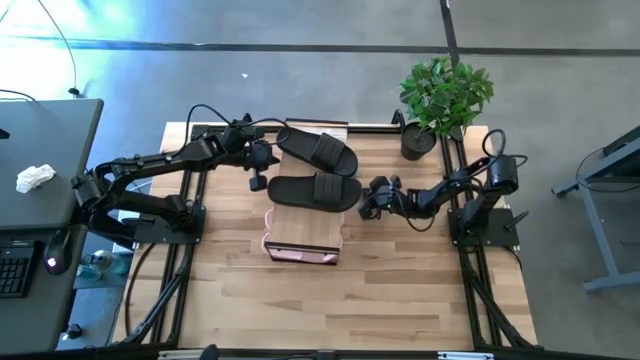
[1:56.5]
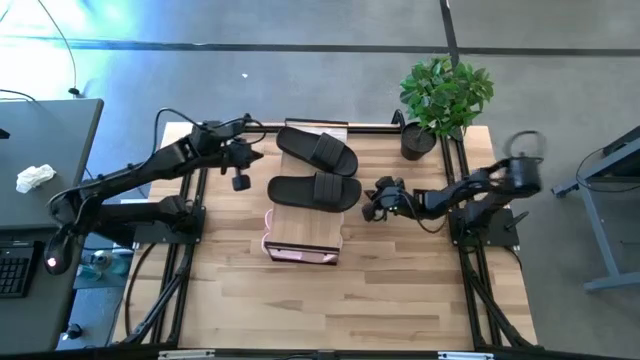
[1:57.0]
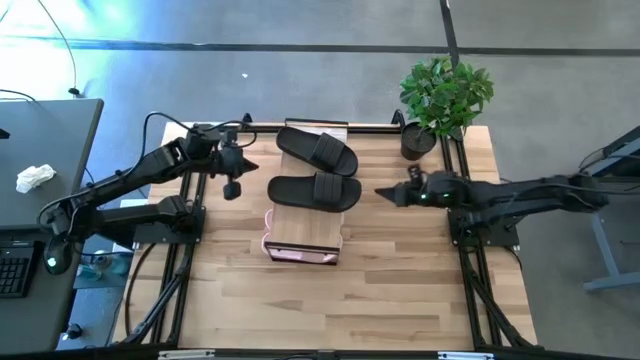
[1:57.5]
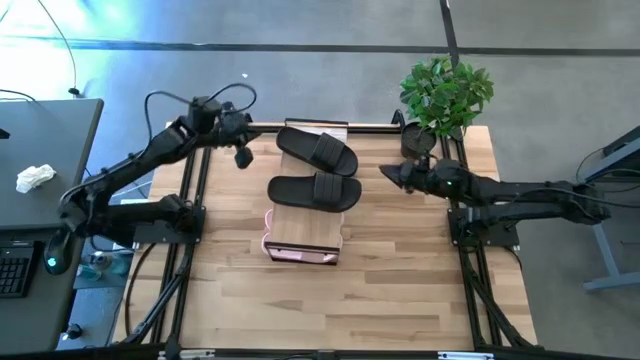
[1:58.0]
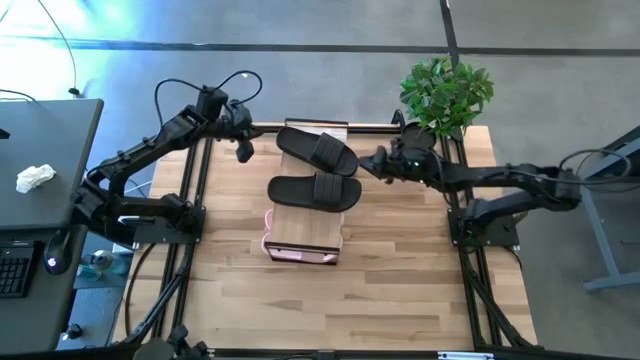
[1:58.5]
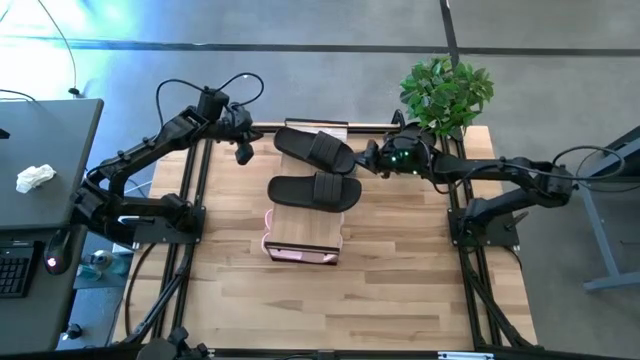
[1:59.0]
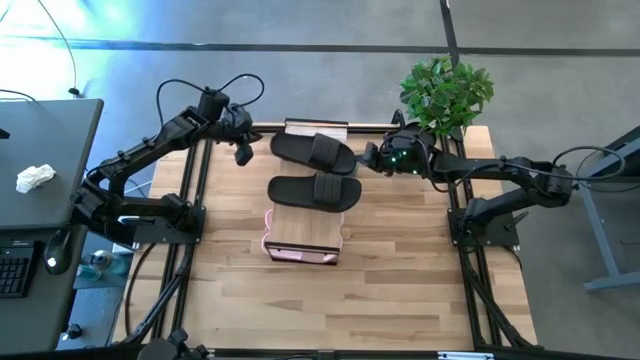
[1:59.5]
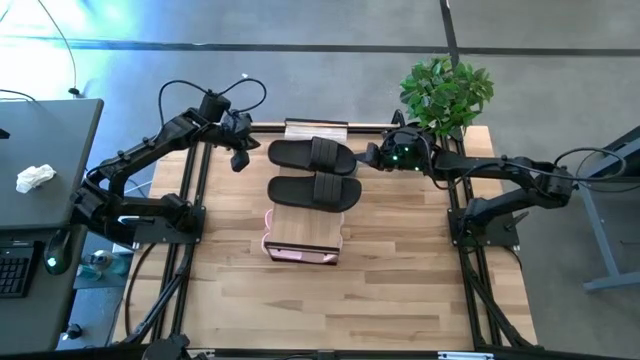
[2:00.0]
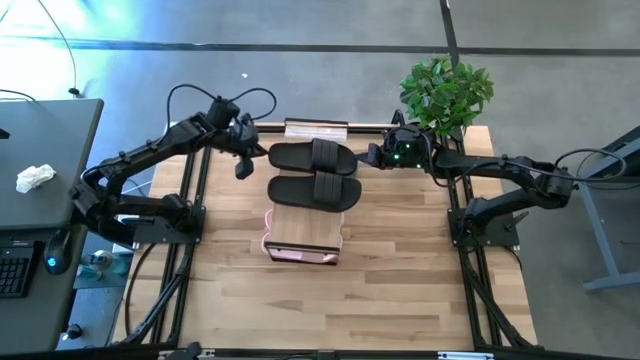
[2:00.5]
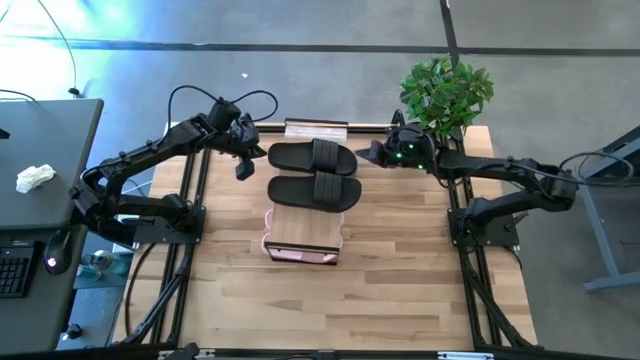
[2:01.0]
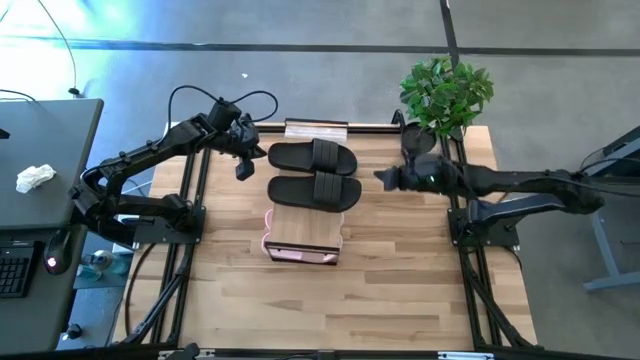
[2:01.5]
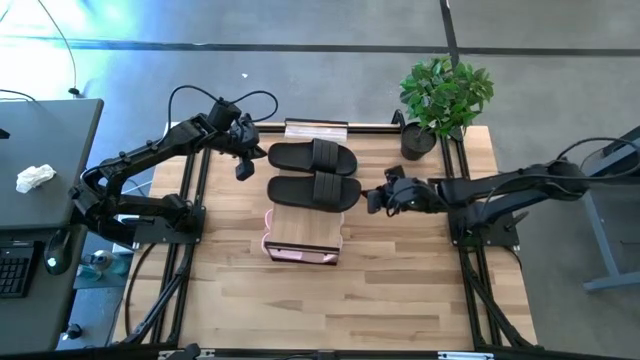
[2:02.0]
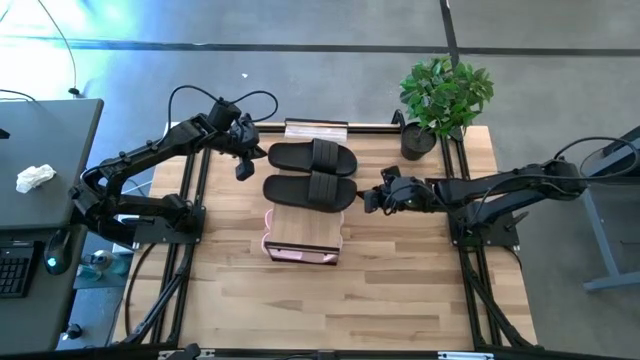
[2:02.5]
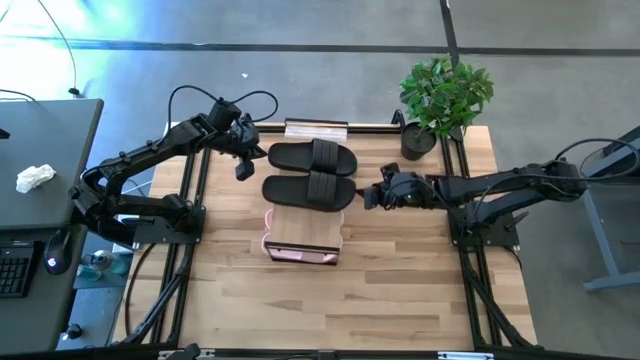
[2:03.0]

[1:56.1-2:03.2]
Task: Pick and place slides into the shelf
Adjust the black slides on the shelf

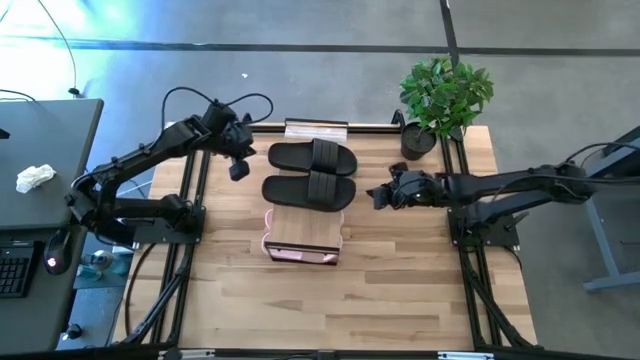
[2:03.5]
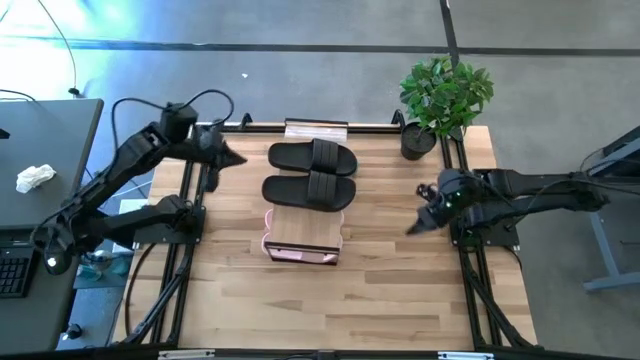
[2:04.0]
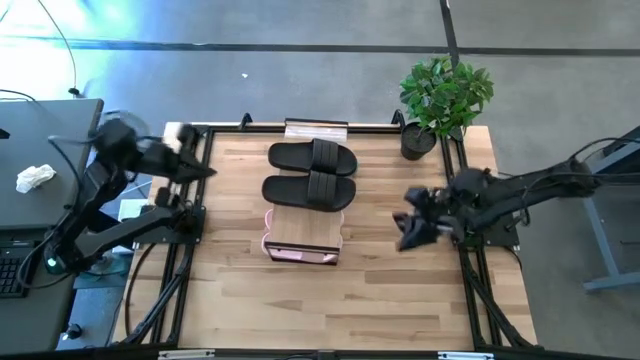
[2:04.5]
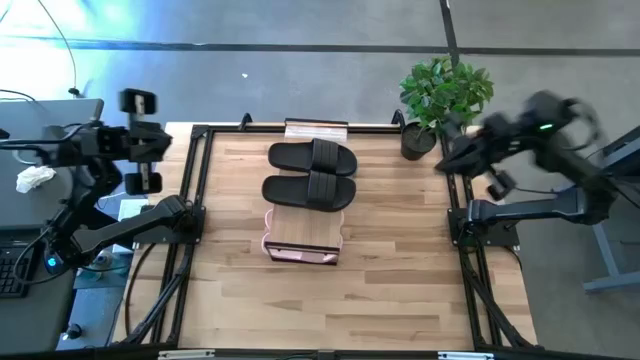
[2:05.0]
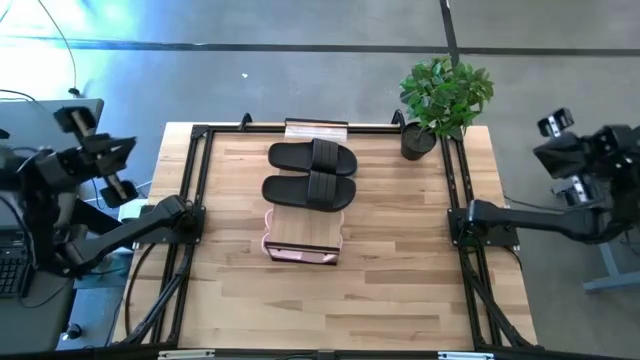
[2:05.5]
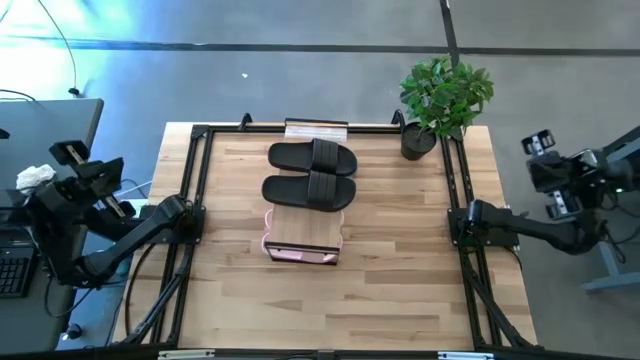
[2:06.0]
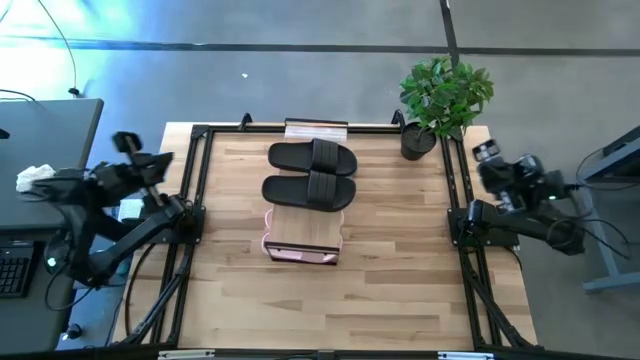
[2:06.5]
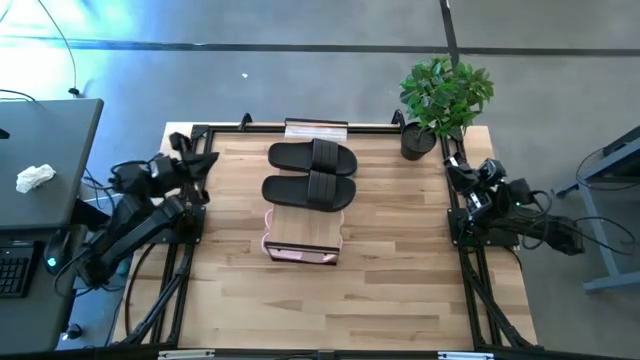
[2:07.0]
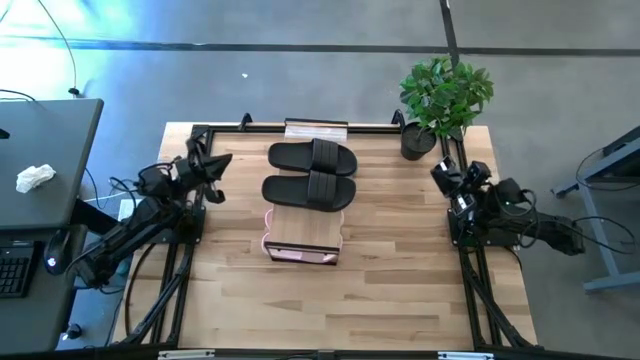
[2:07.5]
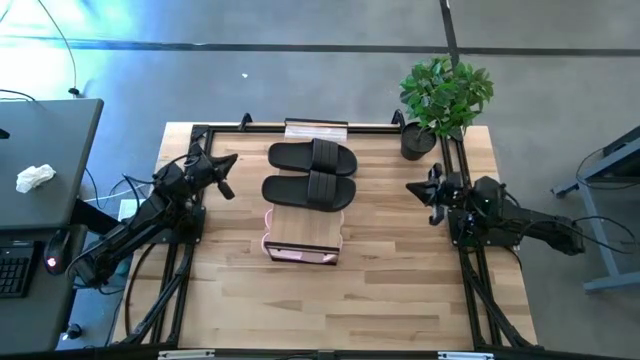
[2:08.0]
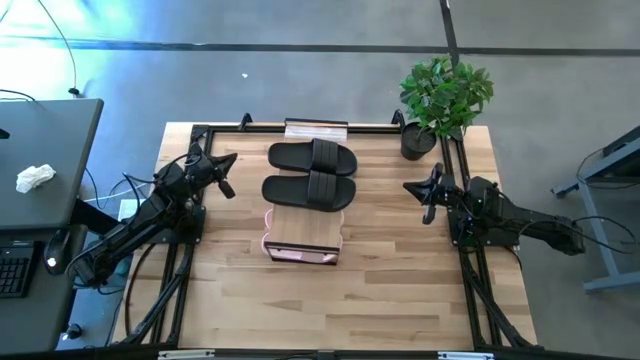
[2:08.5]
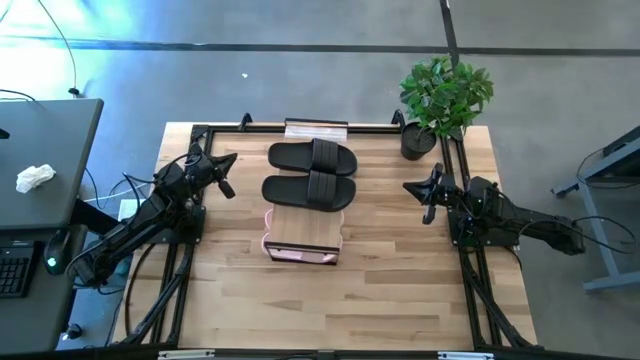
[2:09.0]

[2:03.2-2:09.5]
Return to Home Position

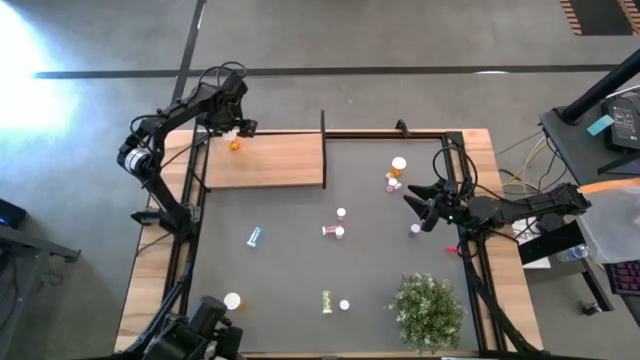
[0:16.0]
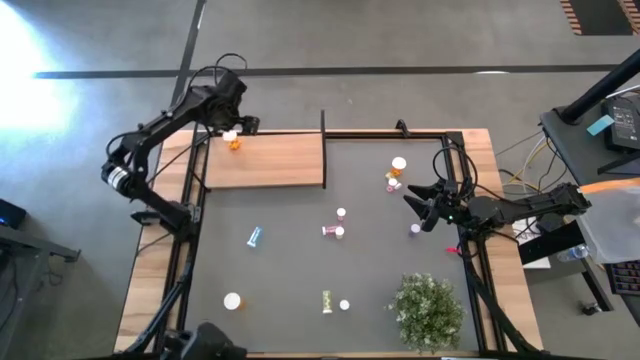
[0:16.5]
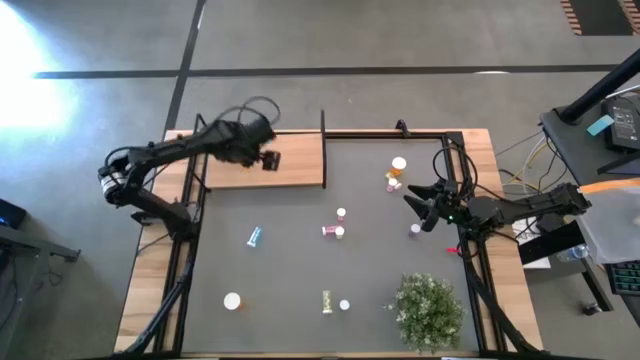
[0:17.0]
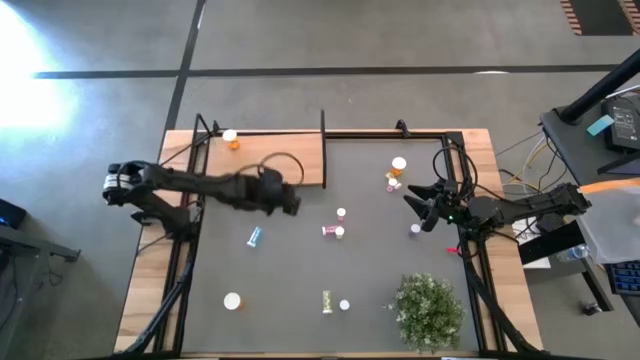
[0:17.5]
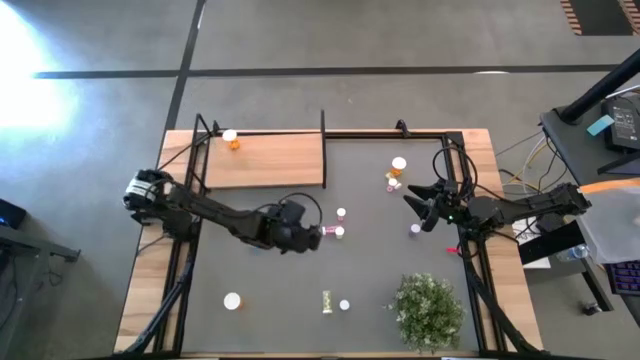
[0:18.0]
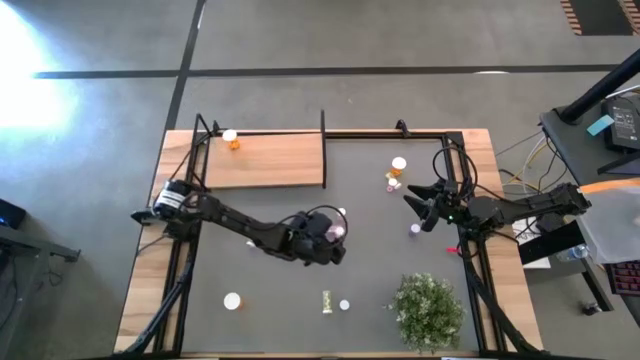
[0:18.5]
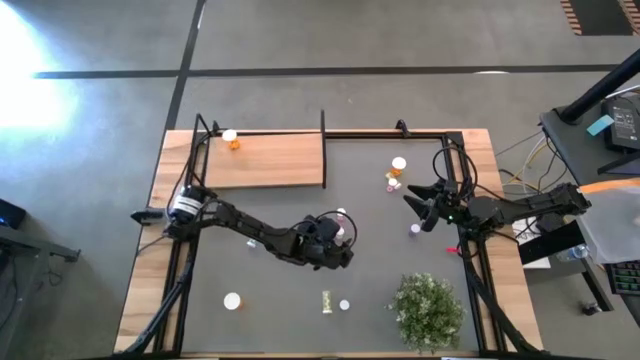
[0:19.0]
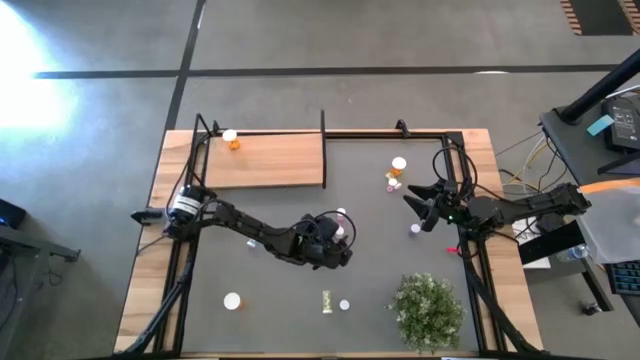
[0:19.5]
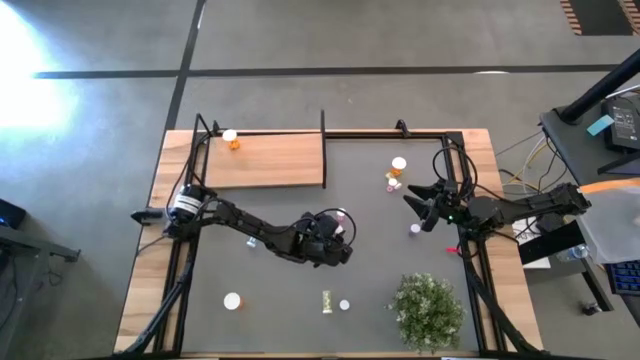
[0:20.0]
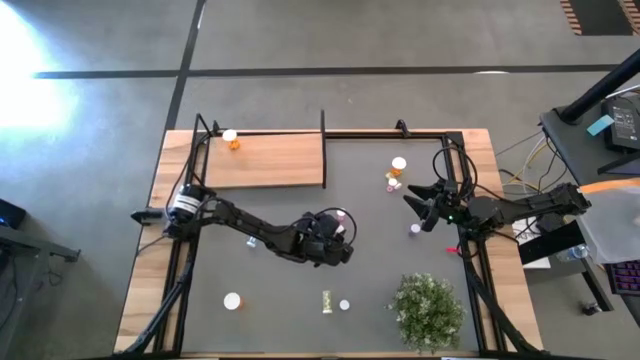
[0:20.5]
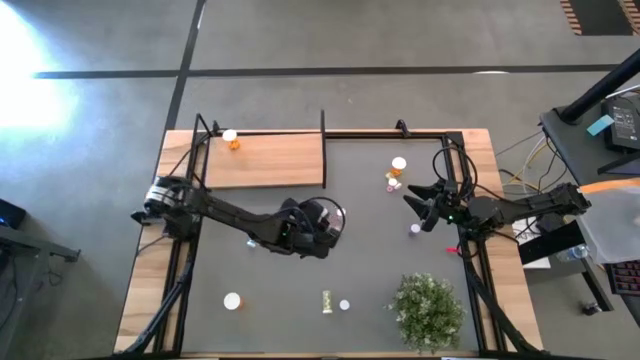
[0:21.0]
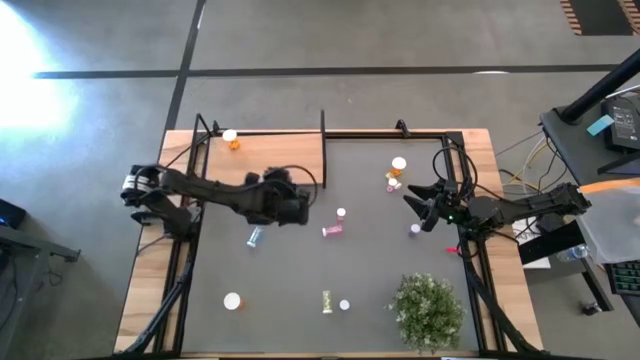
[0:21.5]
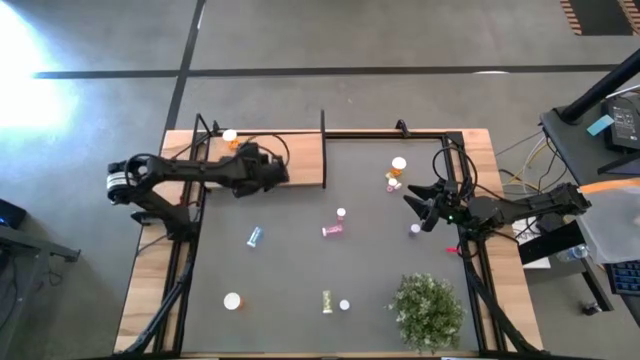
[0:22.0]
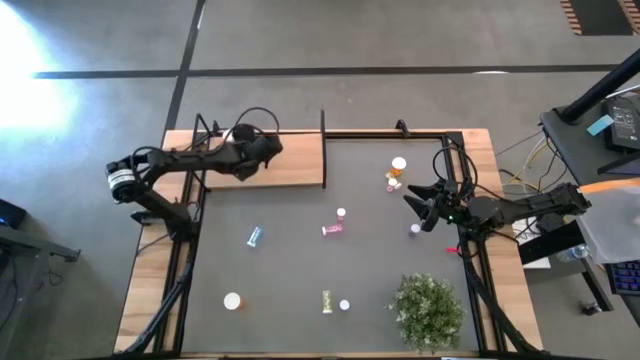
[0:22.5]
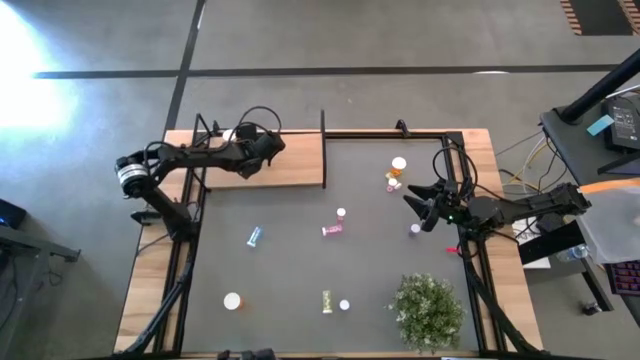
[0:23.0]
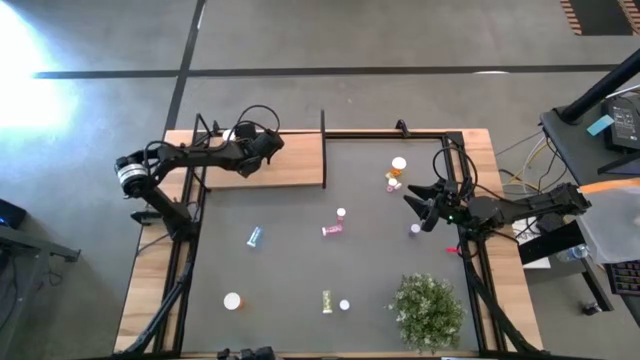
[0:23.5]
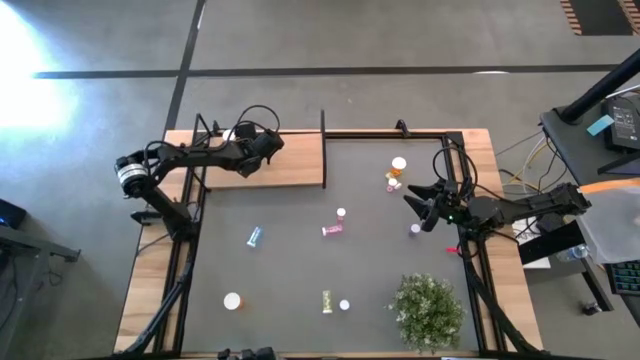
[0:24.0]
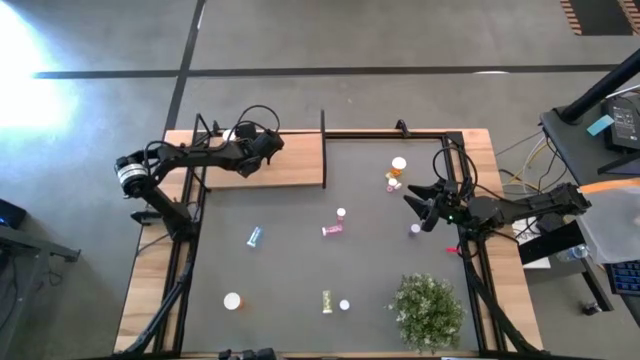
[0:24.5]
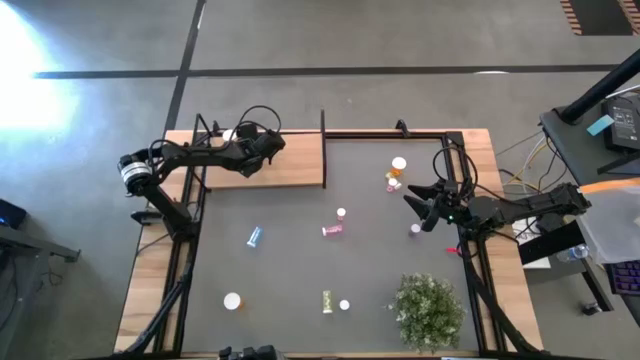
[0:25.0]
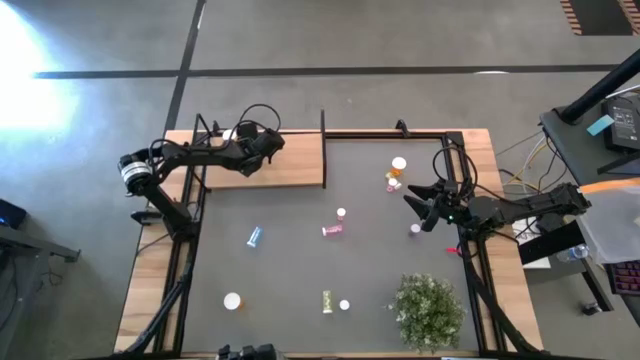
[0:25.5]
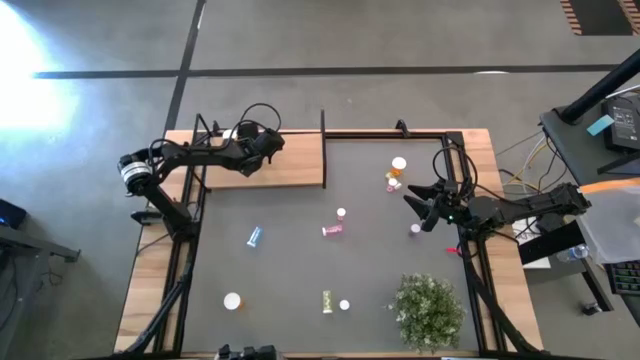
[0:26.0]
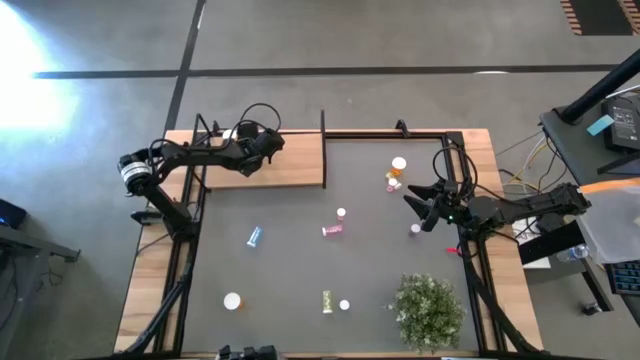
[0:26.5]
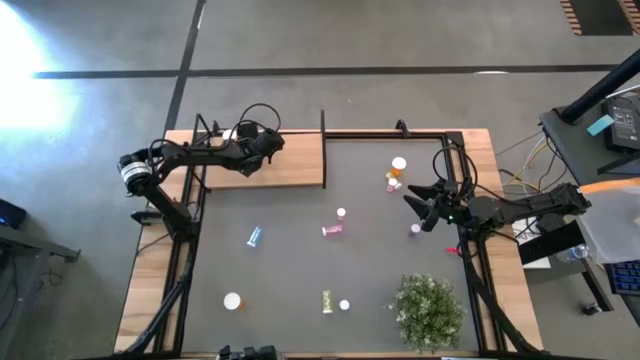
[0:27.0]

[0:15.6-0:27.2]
Task: Pick and place medicine bottles onto shelf by color
Put the middle yellow pill bottle on the shelf
